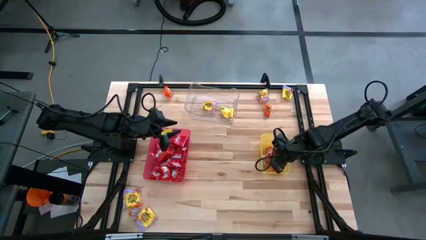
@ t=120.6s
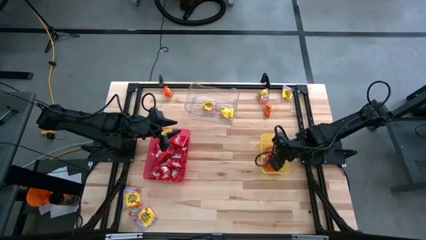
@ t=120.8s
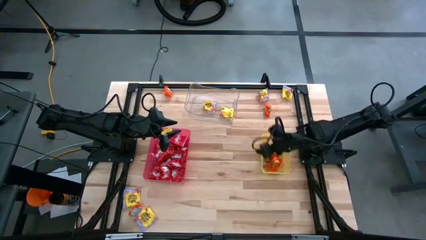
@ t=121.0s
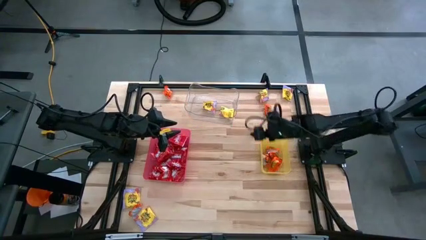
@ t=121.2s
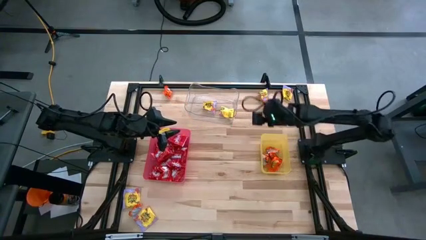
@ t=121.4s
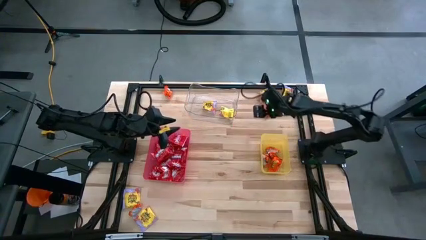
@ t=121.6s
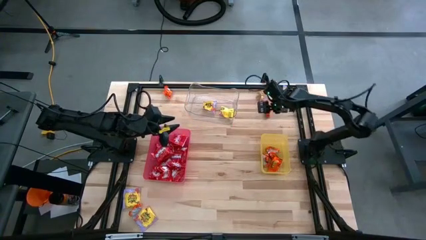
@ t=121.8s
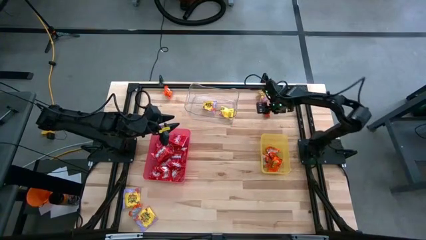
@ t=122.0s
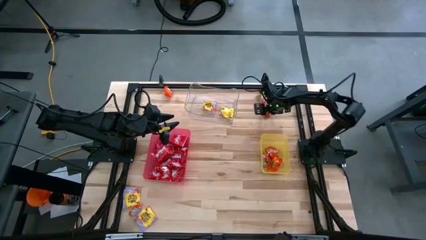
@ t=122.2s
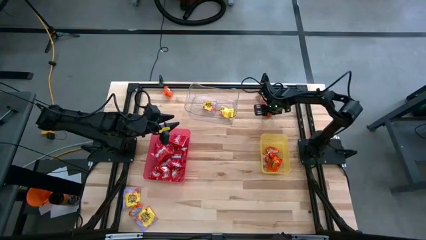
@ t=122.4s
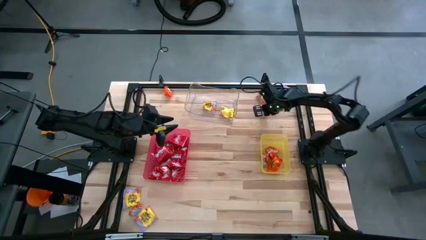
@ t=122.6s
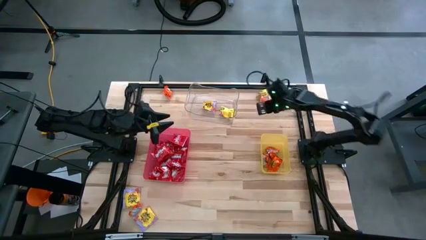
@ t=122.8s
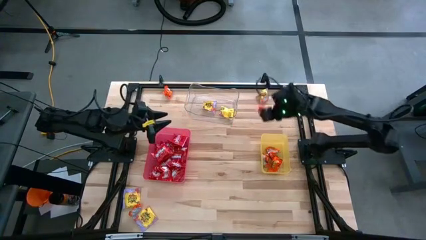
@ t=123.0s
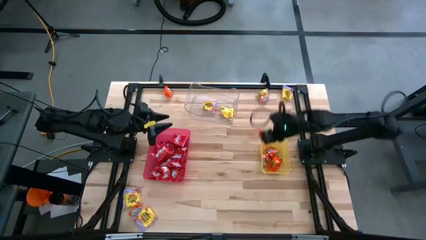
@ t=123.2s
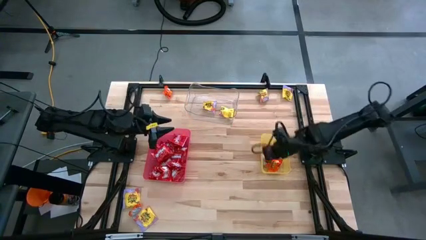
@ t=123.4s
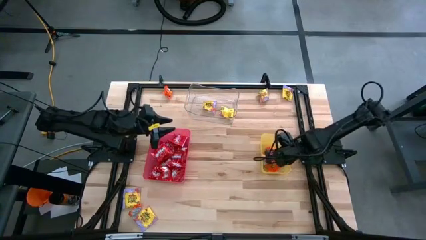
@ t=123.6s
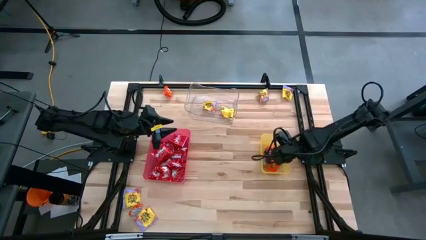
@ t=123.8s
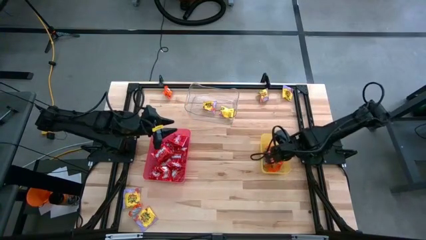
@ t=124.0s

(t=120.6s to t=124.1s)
Task: Sort candy
Put the orange candy into the yellow bin

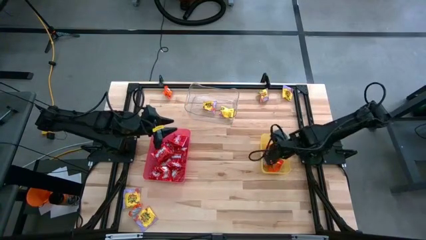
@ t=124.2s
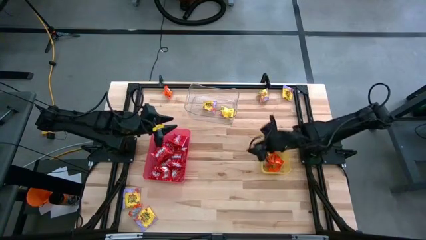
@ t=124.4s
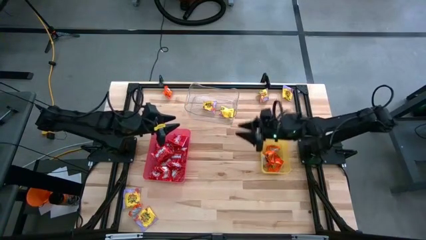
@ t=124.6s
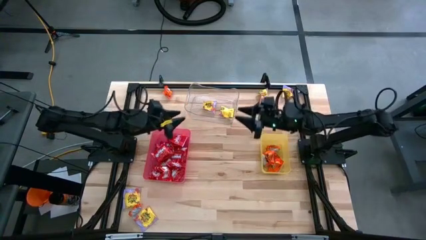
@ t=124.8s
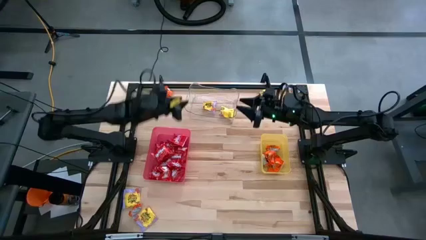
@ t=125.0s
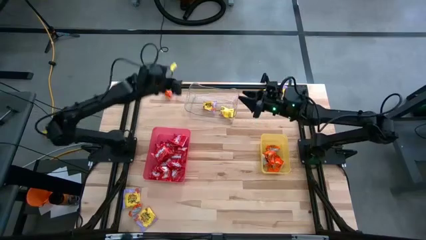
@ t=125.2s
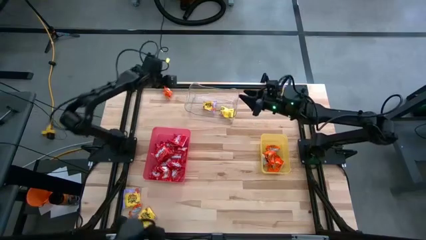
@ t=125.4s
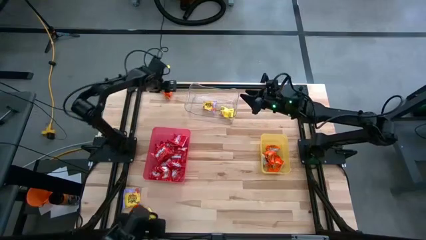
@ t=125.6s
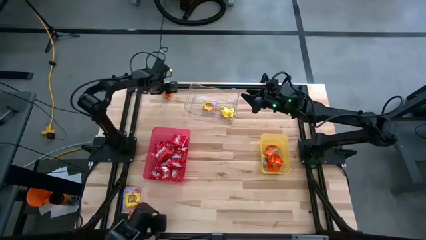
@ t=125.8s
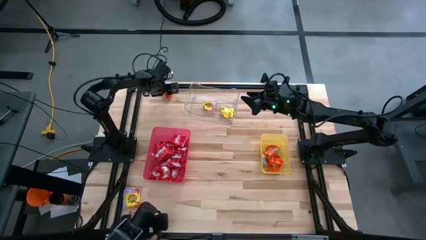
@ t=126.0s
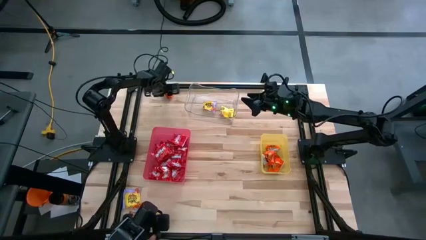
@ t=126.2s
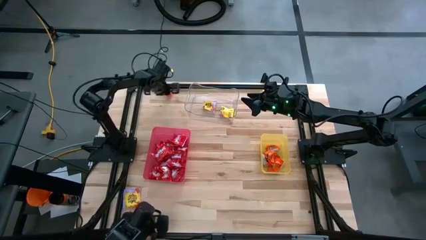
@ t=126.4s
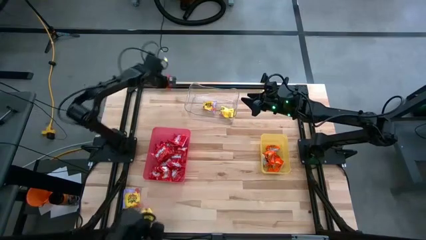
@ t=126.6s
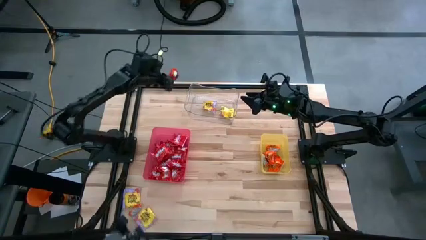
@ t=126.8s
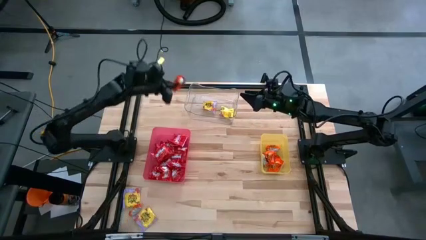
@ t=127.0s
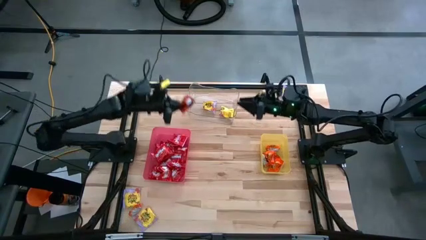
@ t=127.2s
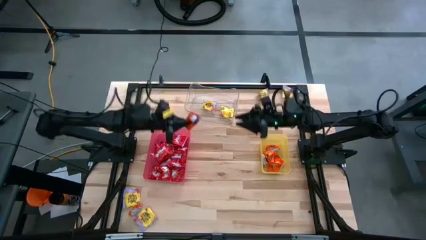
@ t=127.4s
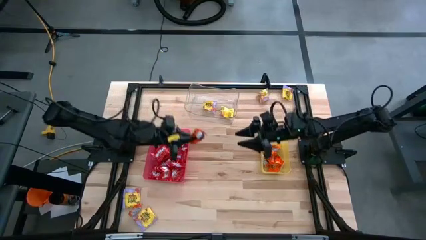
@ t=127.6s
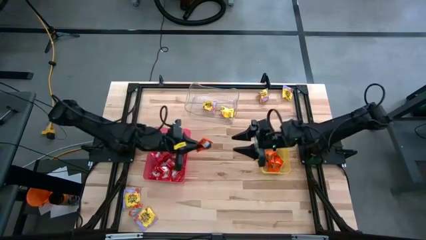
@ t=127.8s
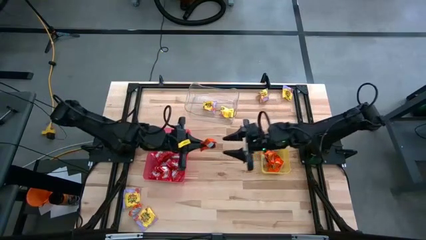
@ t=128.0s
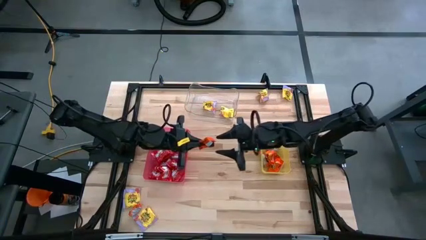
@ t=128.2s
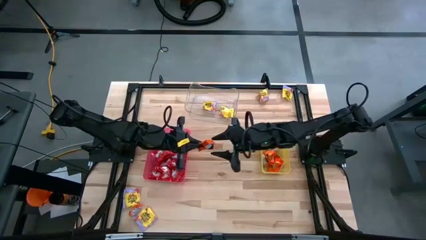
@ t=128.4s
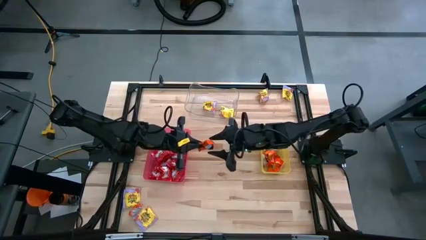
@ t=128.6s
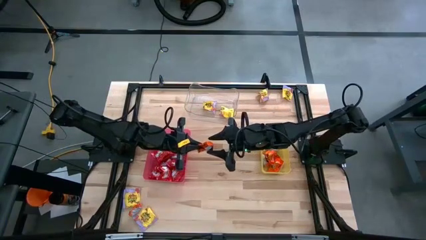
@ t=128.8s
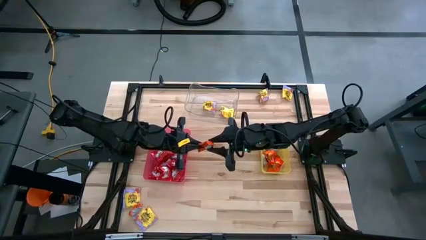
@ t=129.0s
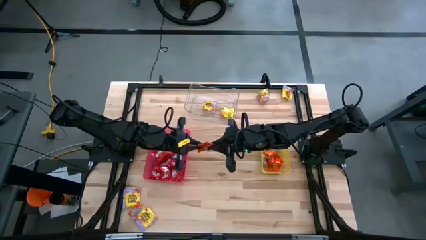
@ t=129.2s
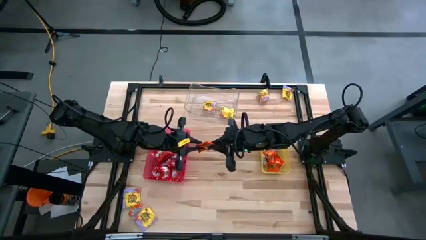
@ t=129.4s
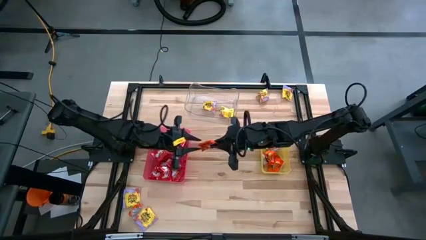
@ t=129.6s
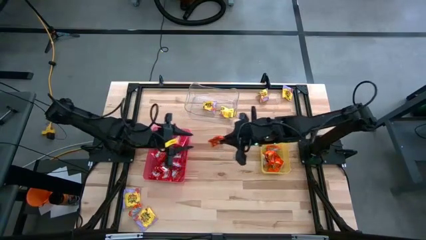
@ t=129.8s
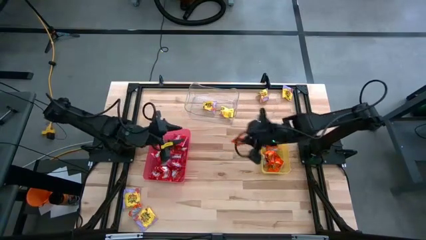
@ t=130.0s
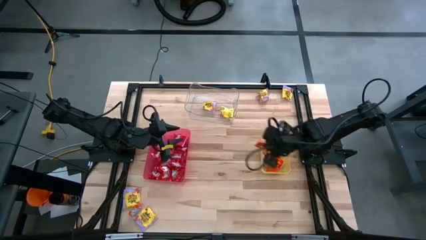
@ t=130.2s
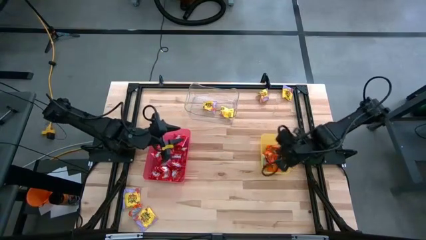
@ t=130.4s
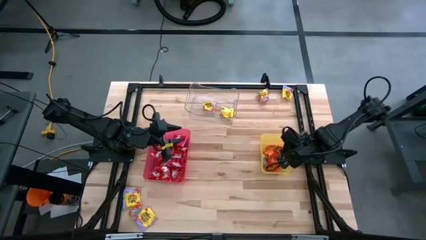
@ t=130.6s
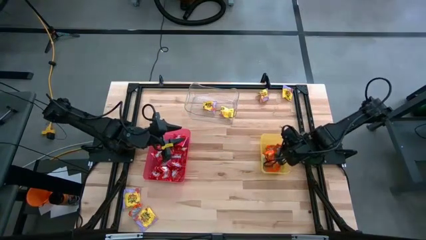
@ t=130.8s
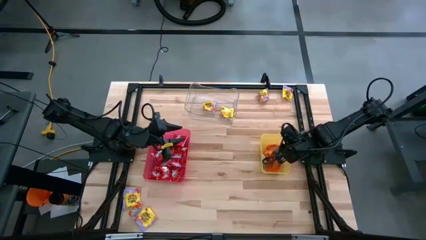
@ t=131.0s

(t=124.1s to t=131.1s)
Put the orange candy into the yellow bin

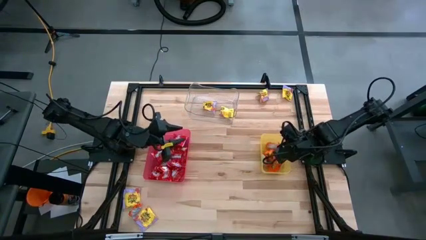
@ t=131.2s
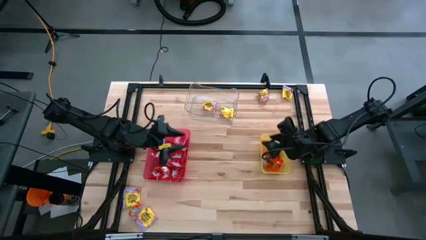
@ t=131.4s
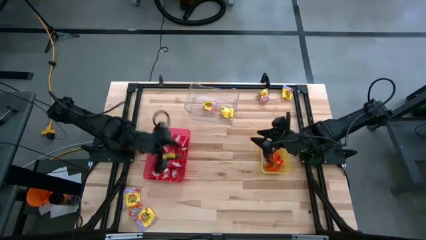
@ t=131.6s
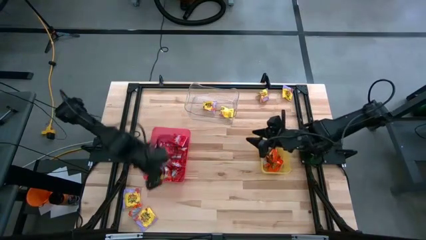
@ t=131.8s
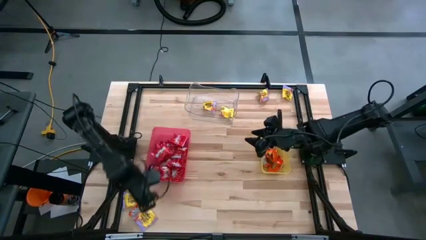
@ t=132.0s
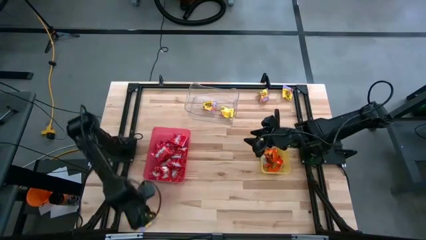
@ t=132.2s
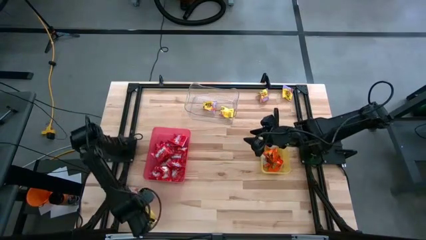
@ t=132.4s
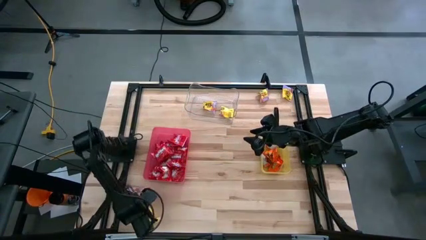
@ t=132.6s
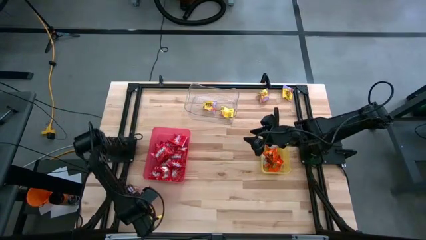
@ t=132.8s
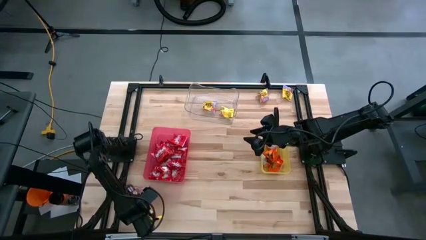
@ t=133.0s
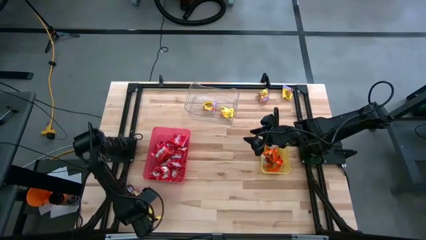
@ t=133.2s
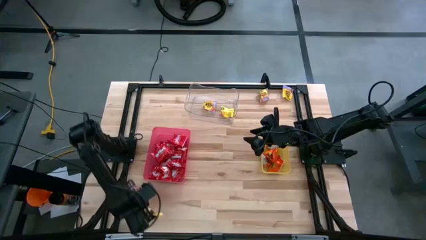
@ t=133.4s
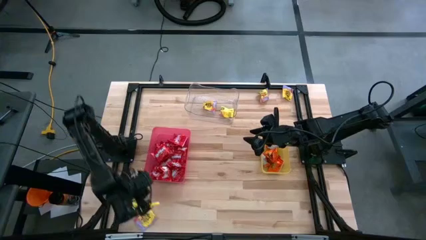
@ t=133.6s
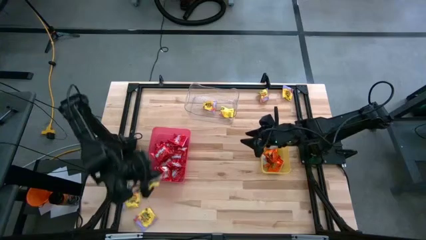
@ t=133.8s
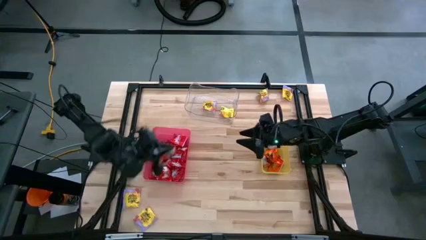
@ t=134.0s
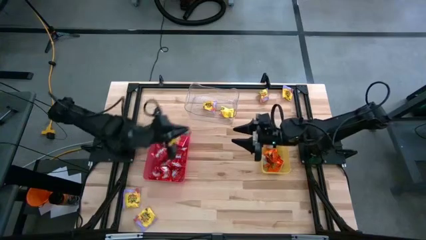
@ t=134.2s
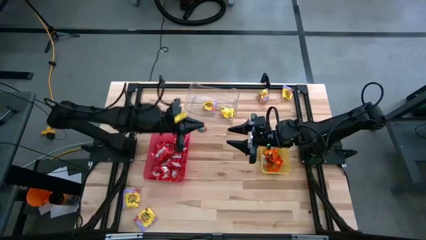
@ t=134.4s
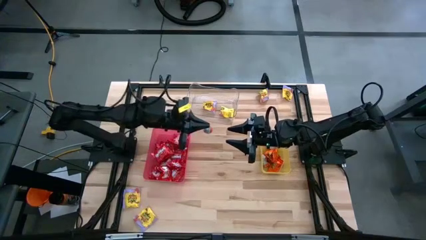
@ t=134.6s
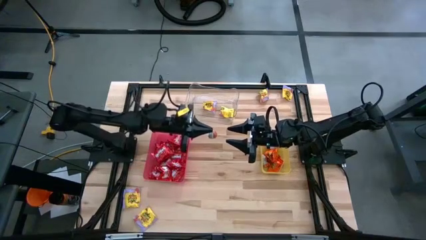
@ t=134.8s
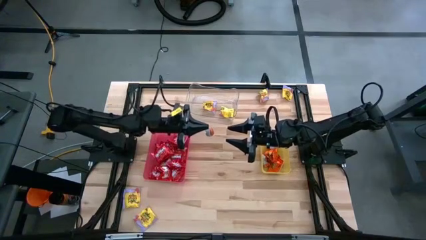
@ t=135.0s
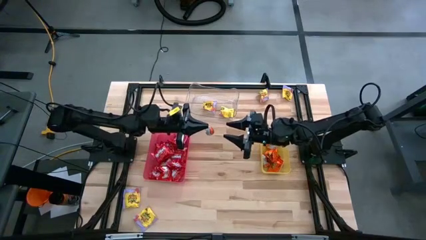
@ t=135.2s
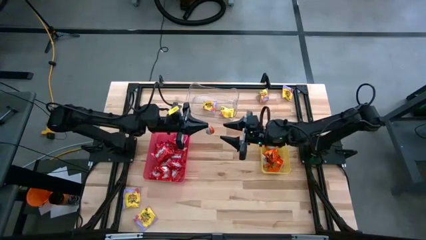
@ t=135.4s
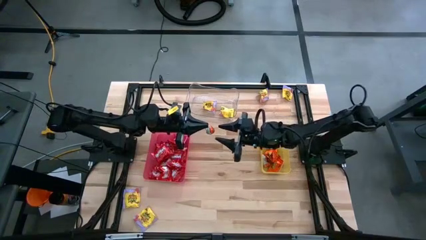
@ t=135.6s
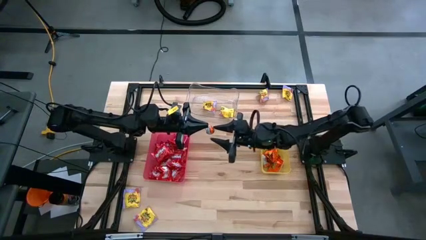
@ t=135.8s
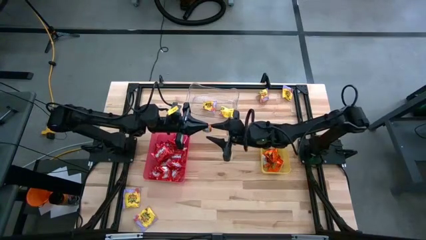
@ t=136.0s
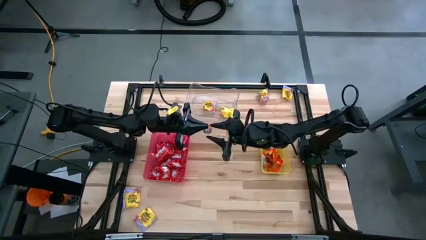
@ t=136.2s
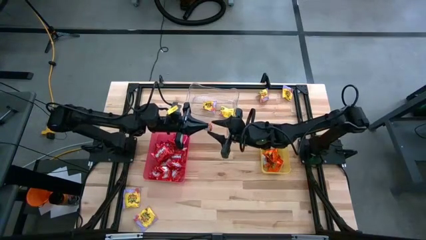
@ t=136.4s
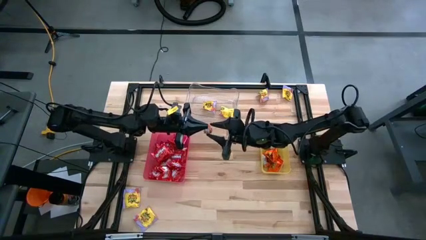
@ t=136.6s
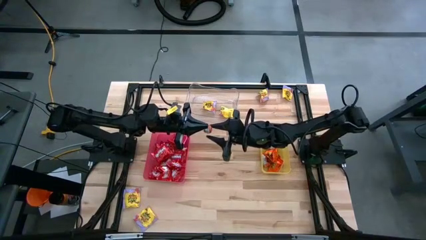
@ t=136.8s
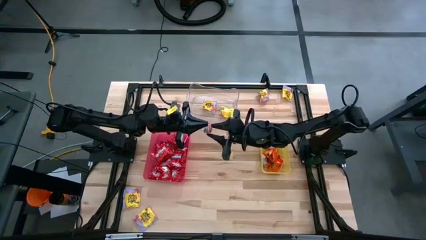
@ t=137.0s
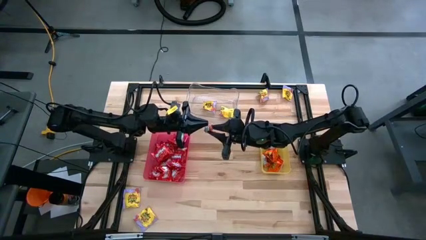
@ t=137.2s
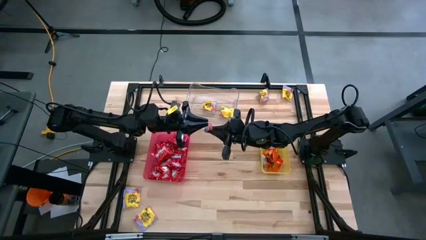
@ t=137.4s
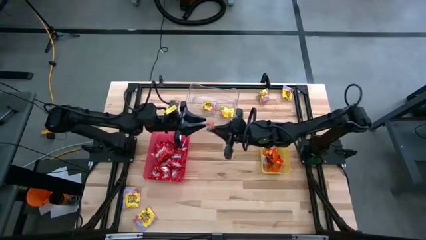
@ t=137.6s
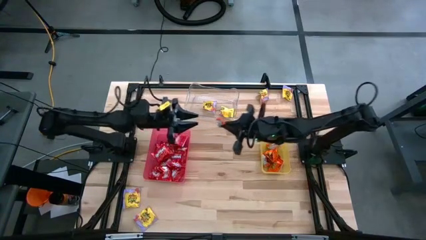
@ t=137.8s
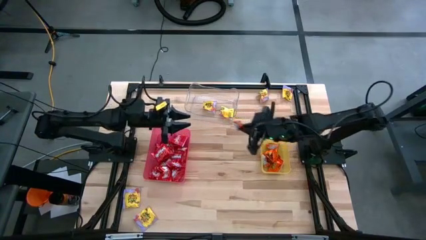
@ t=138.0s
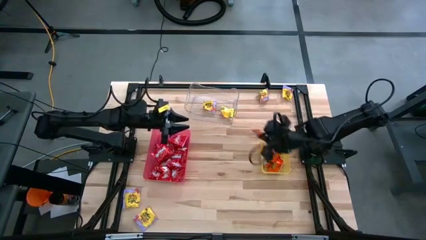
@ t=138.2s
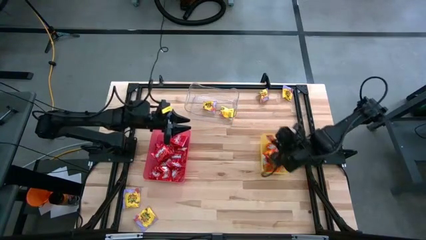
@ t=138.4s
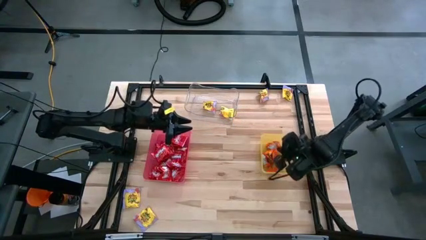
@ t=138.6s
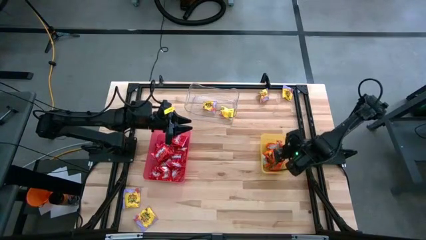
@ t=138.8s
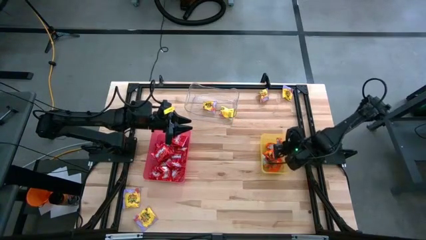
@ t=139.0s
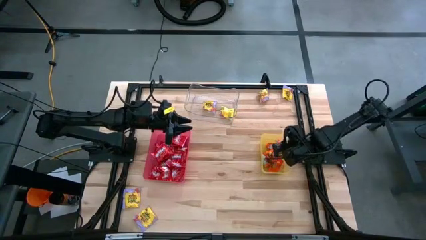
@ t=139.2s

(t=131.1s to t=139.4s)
Put the orange candy into the yellow bin
